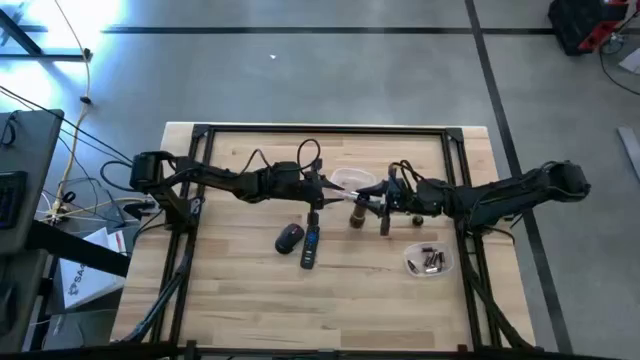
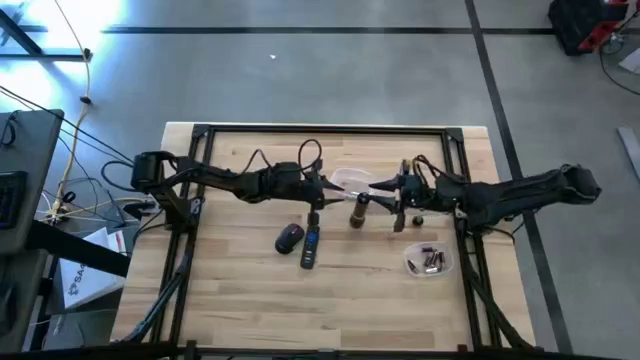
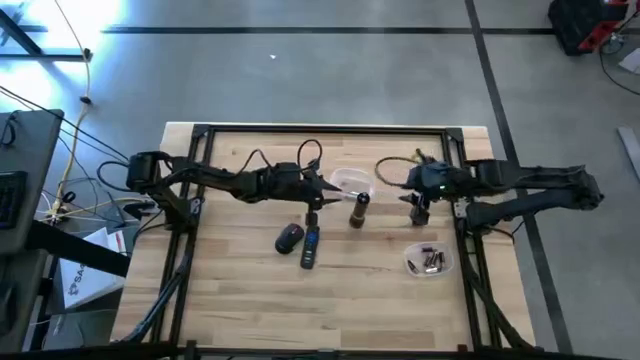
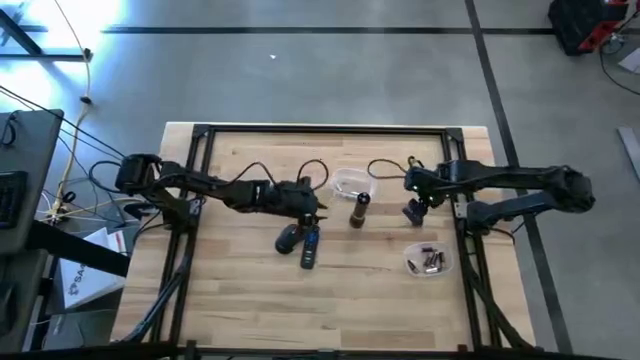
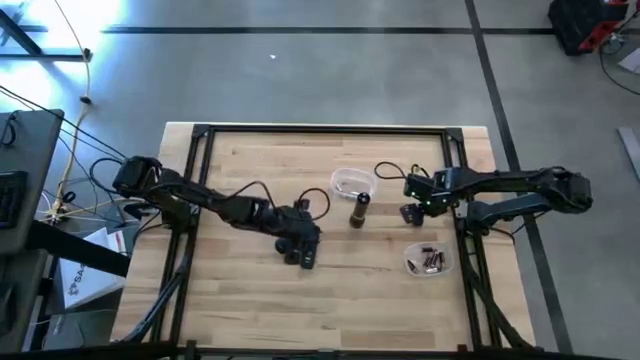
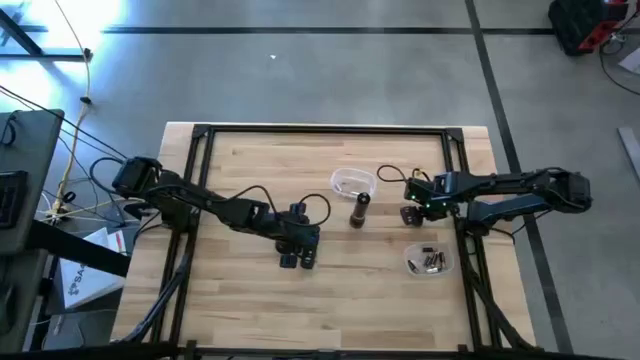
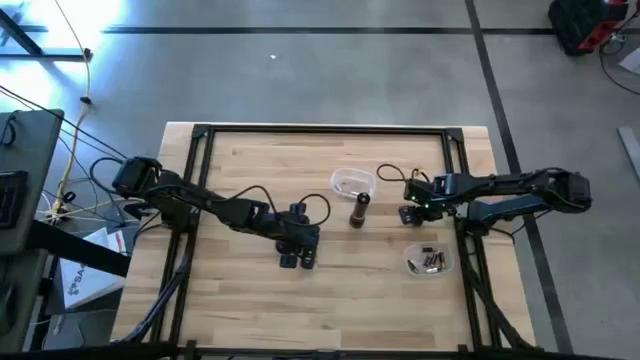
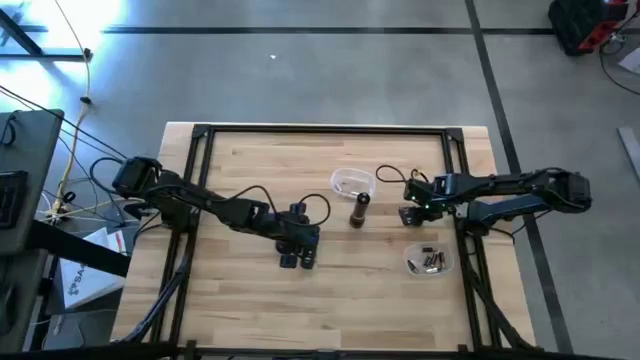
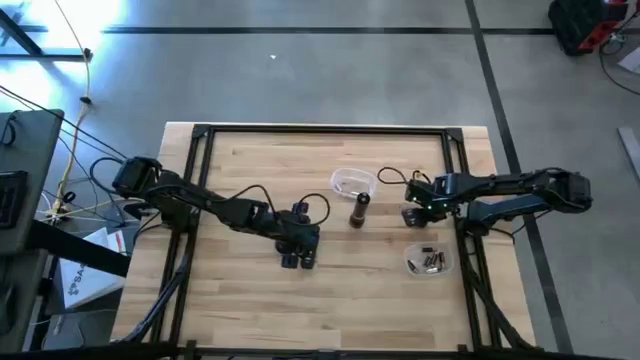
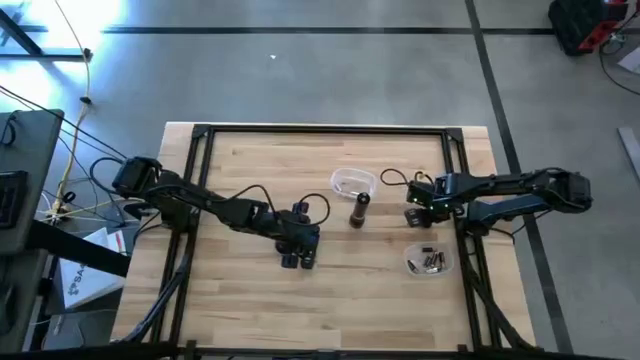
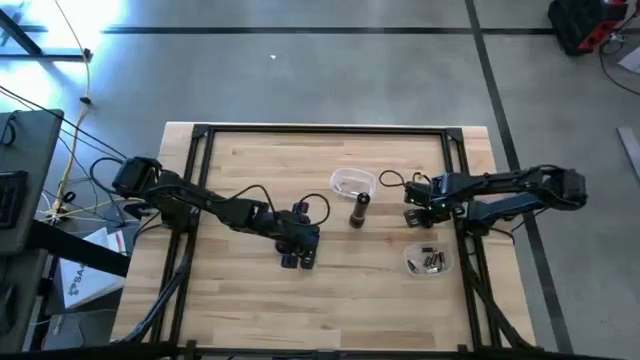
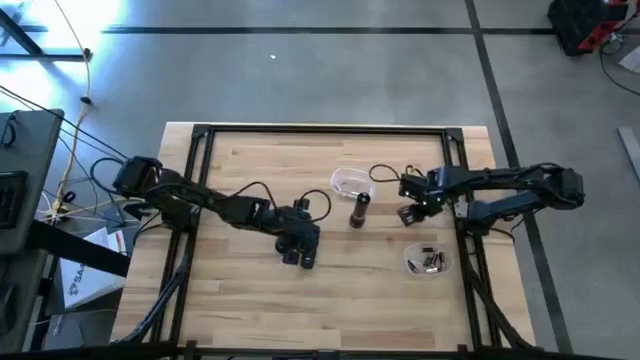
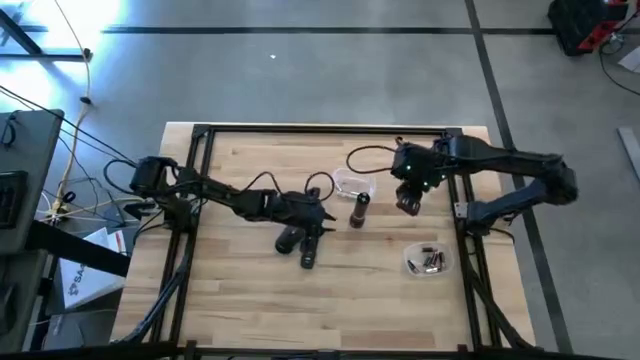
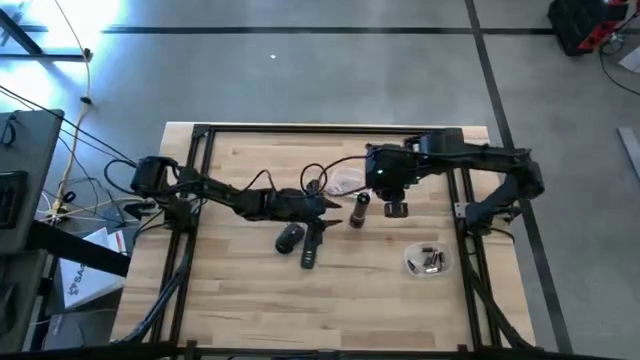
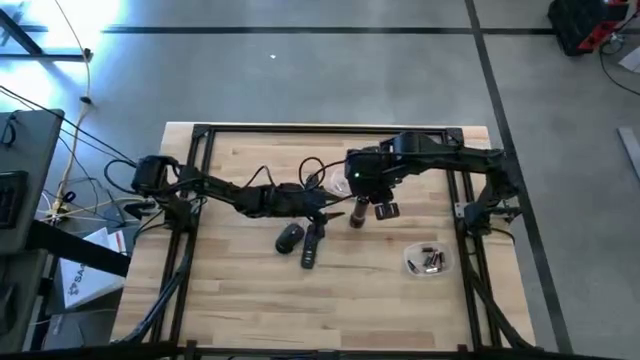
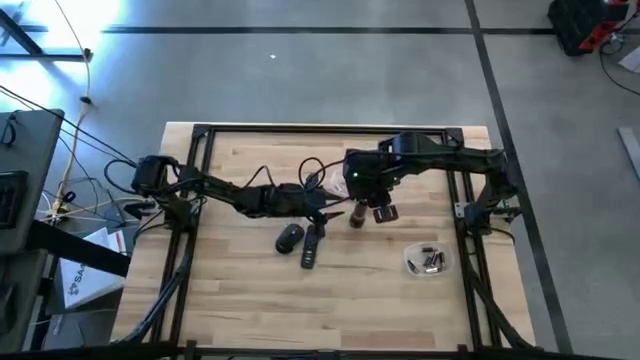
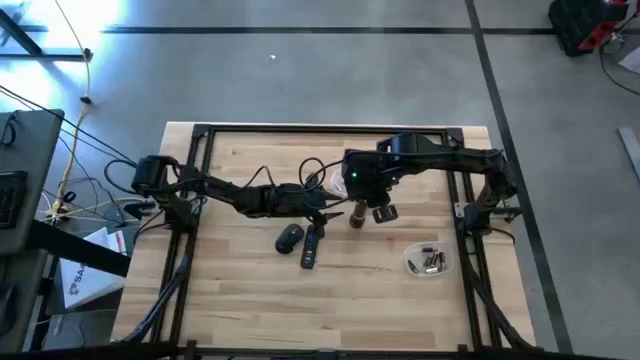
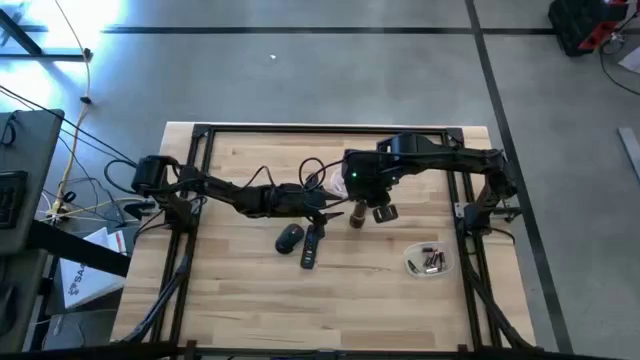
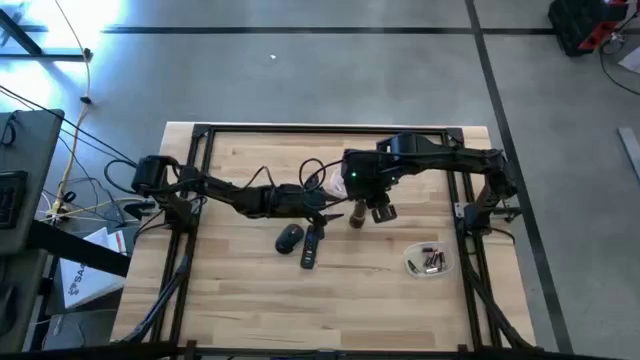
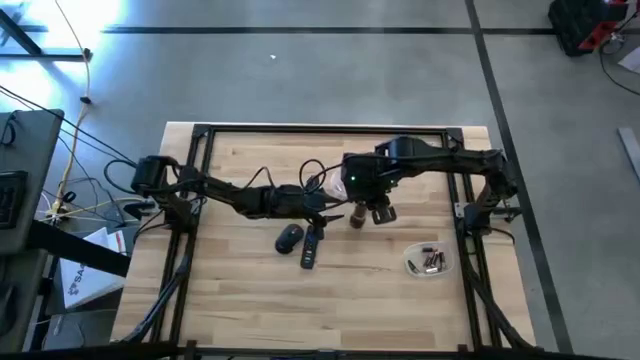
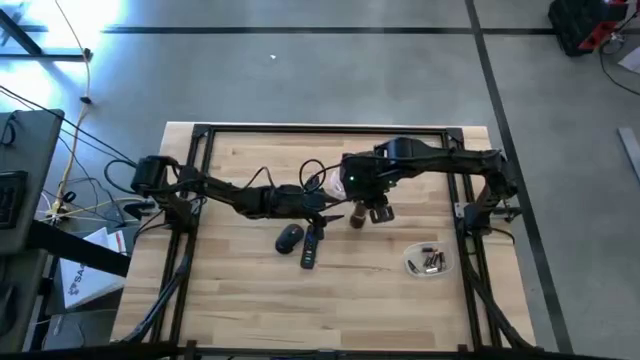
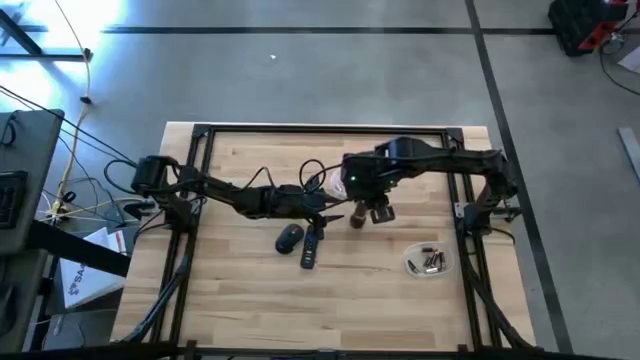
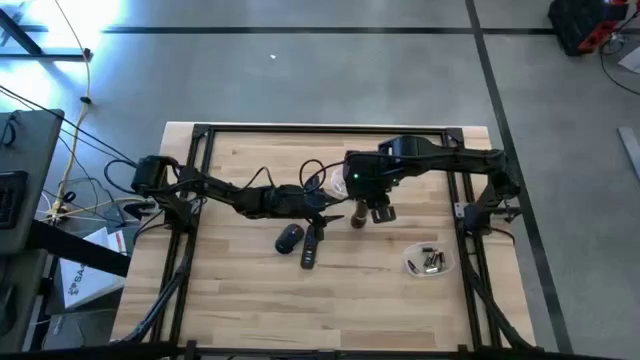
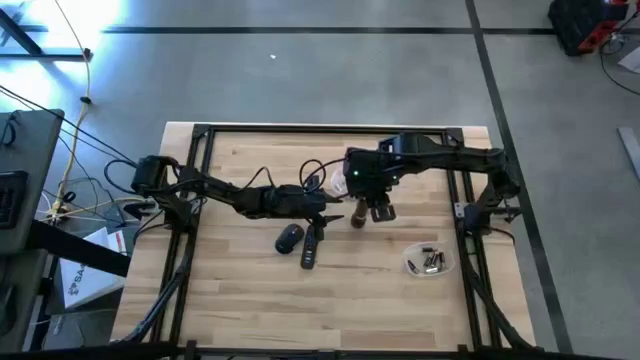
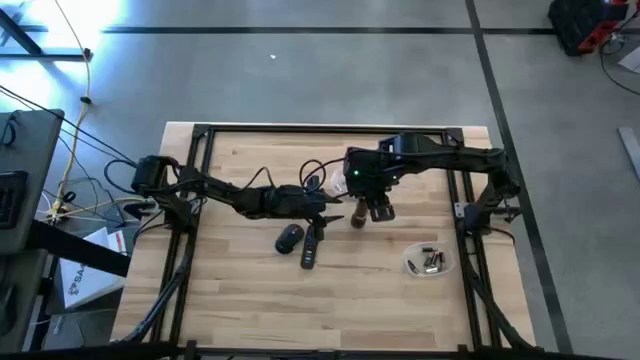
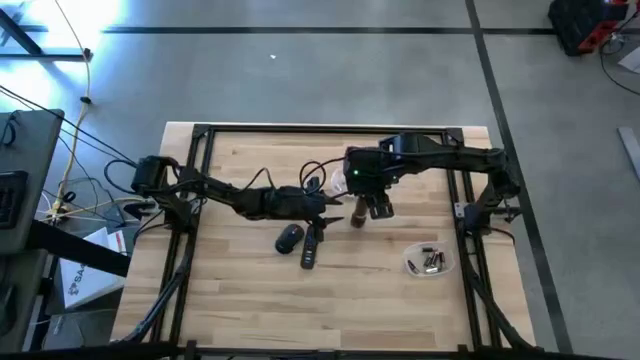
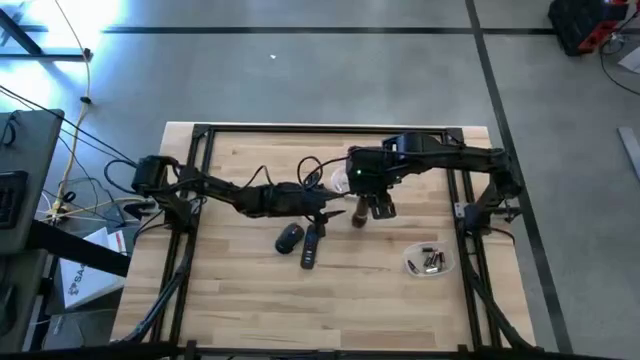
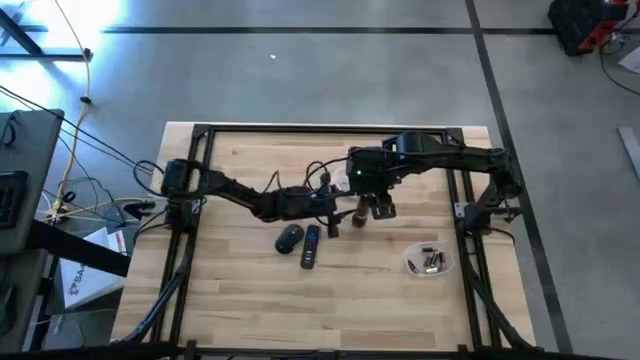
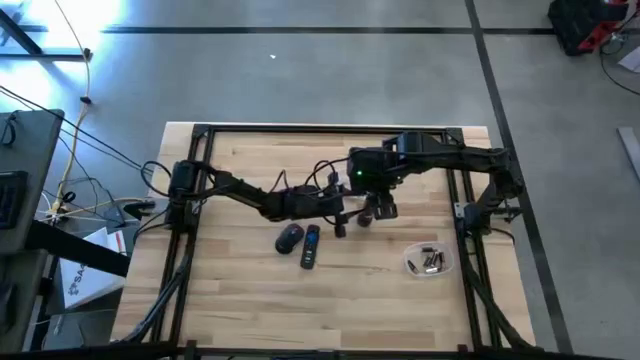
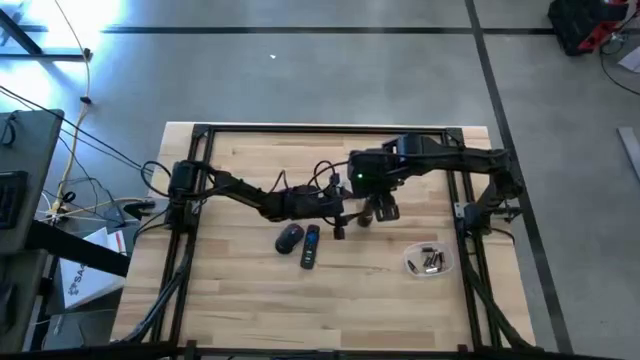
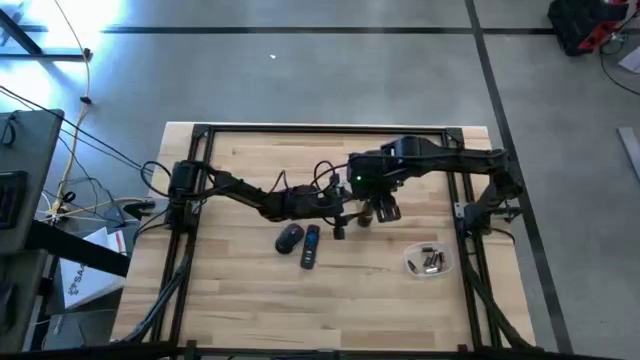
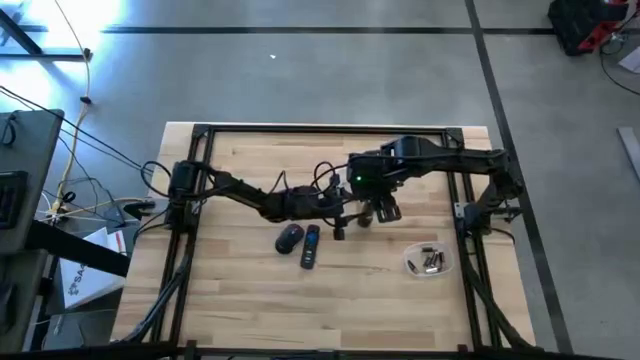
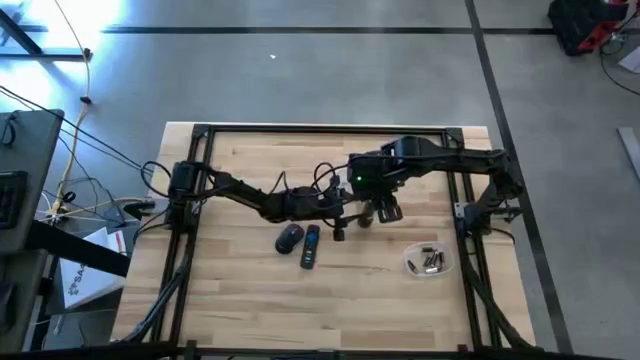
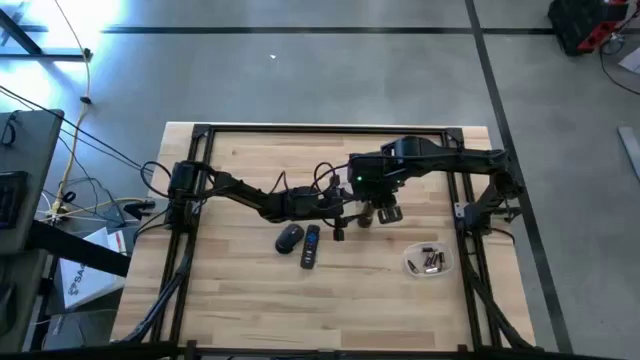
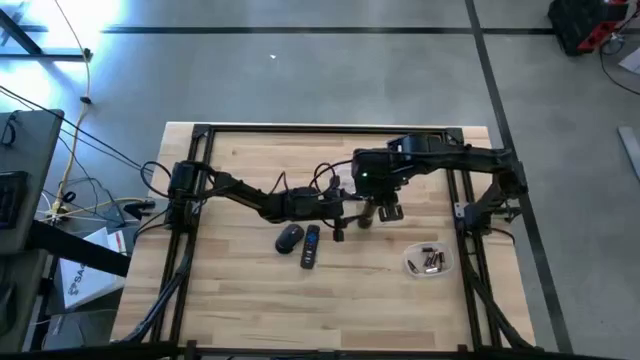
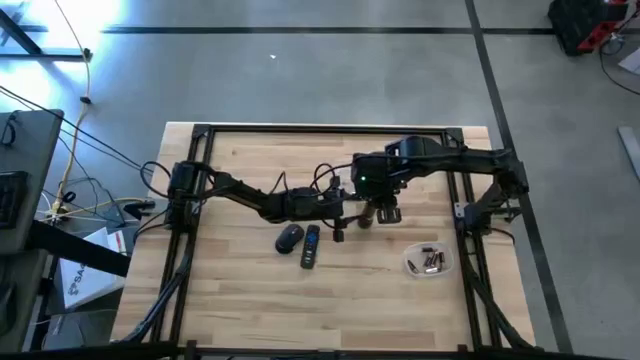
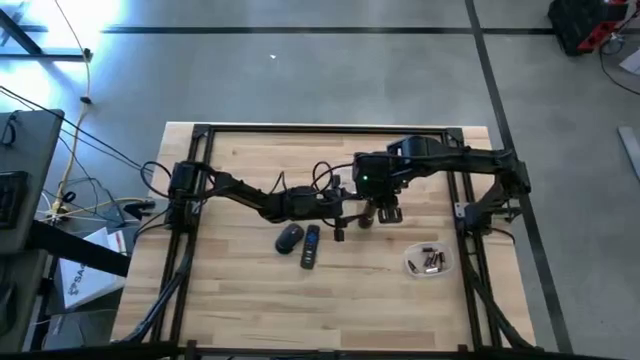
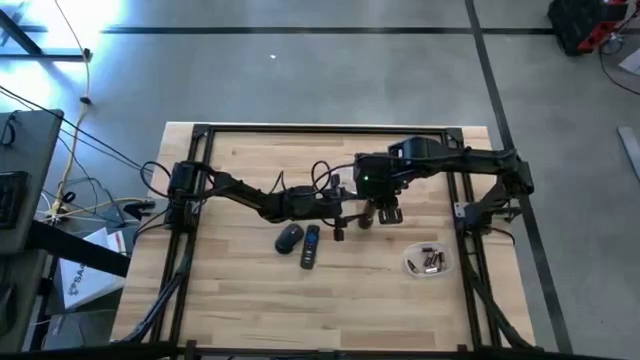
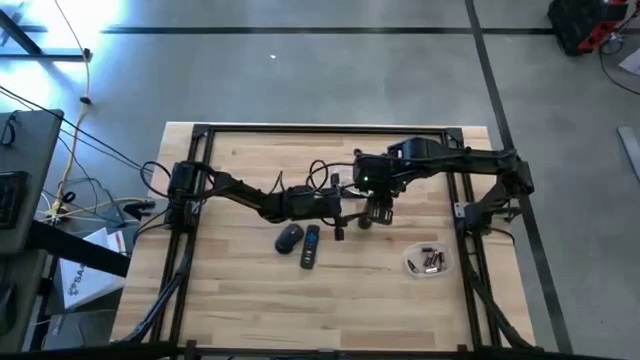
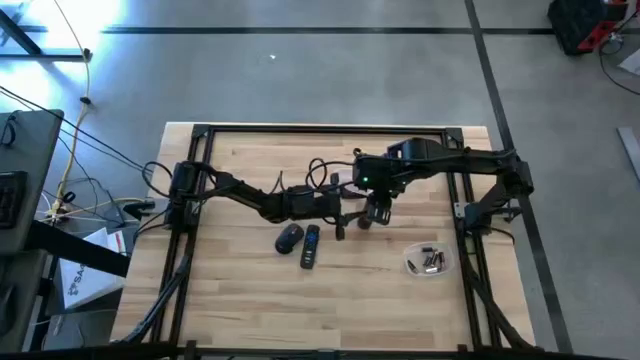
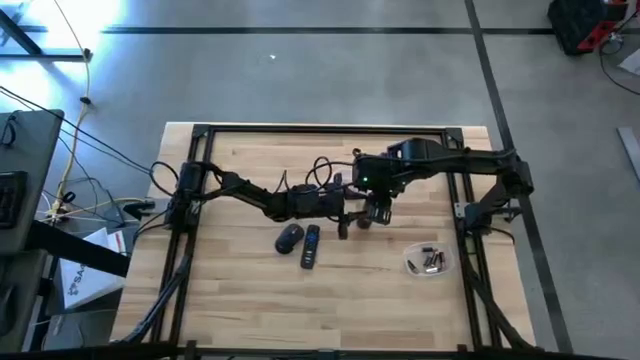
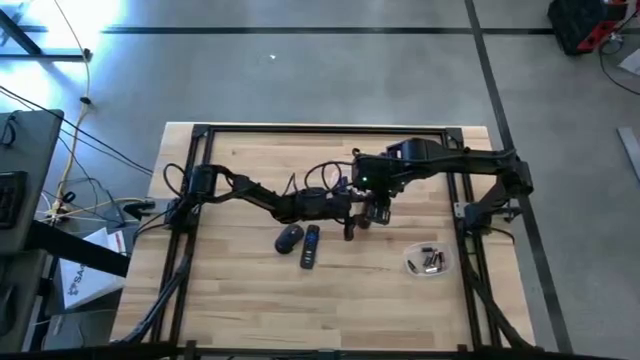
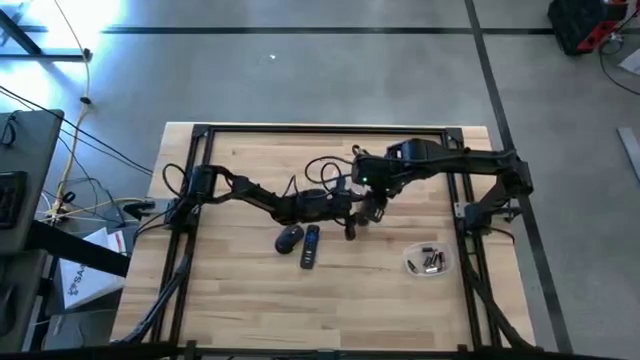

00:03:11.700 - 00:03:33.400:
Task: Insert battery
Close the flashlight battery compartment
